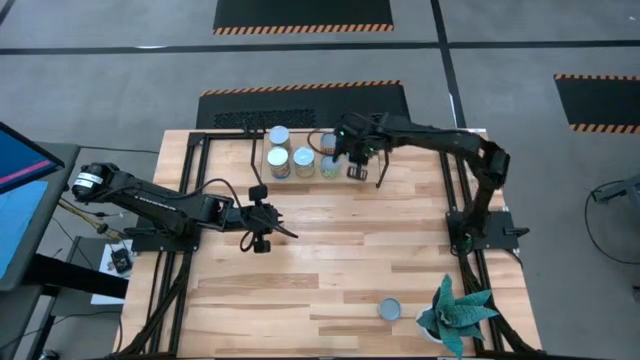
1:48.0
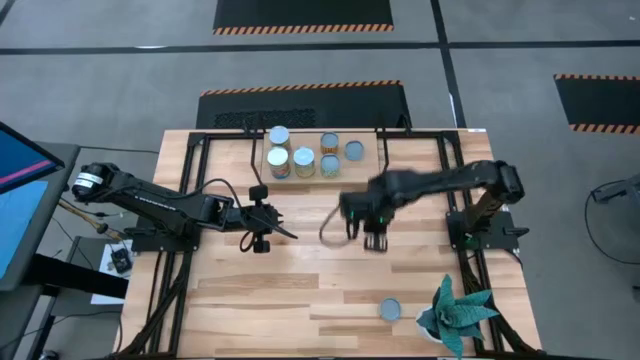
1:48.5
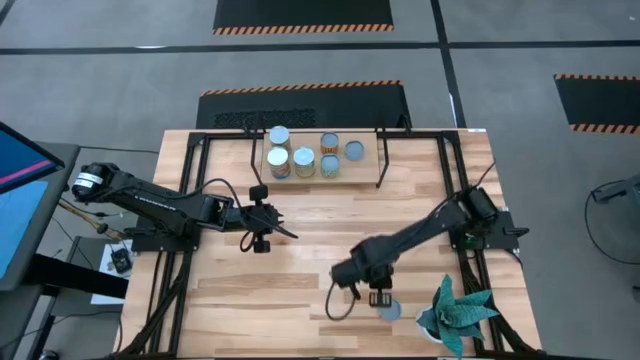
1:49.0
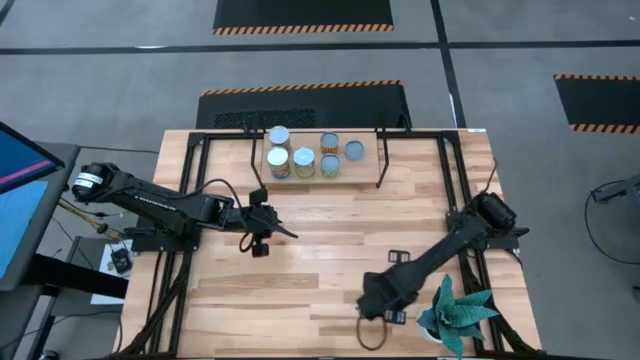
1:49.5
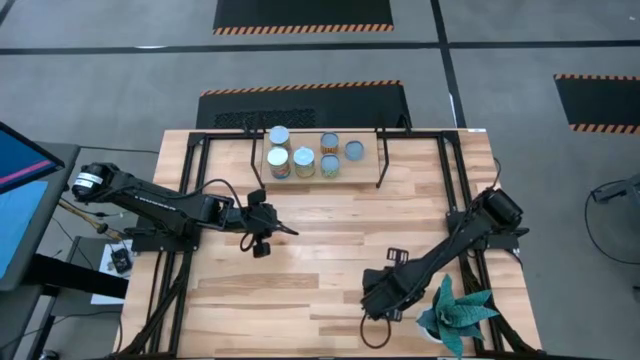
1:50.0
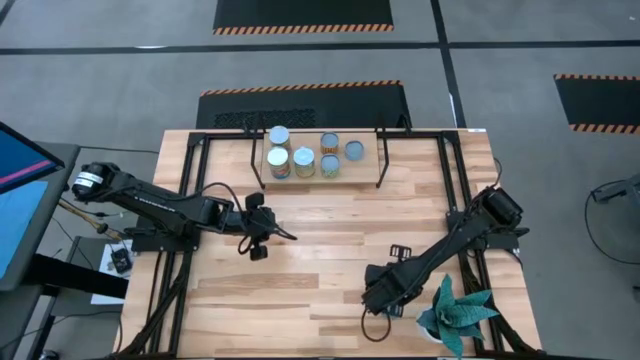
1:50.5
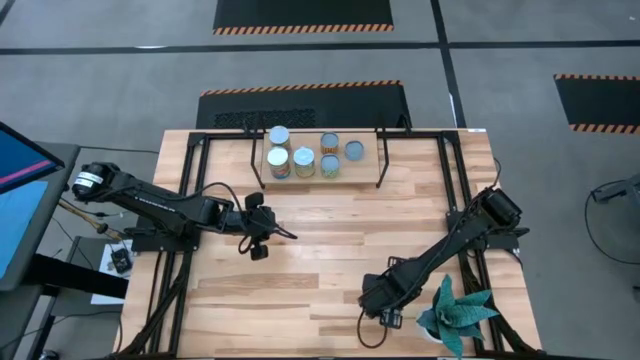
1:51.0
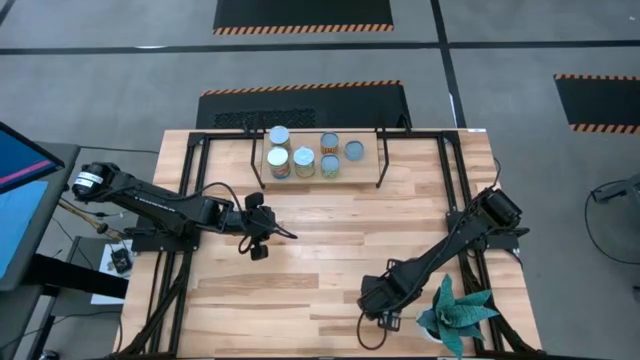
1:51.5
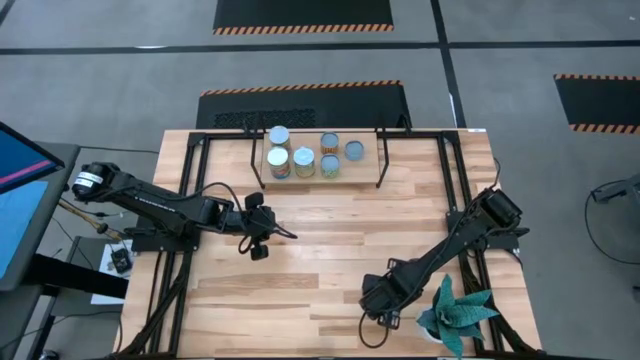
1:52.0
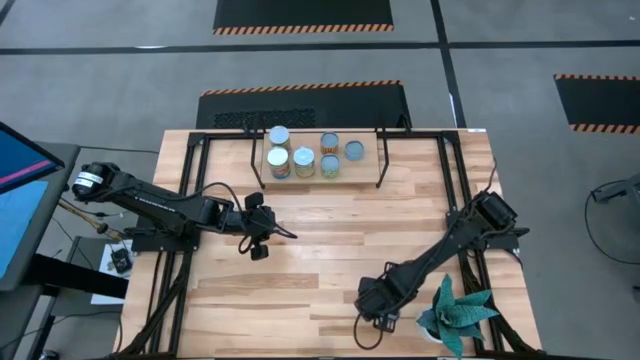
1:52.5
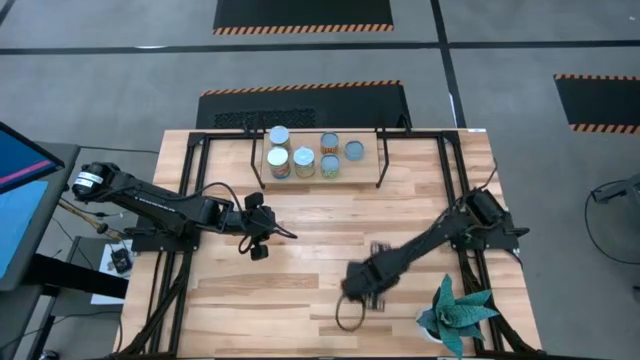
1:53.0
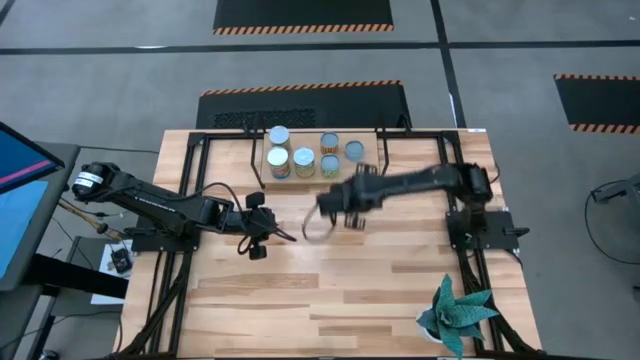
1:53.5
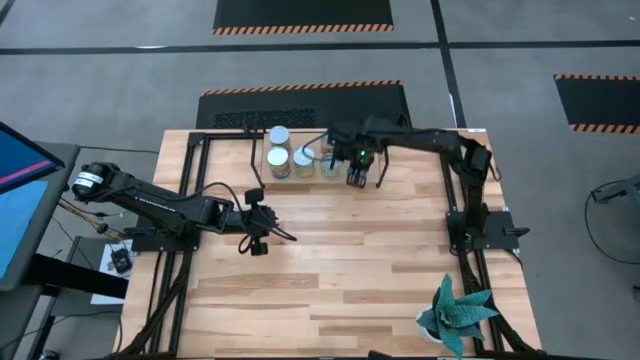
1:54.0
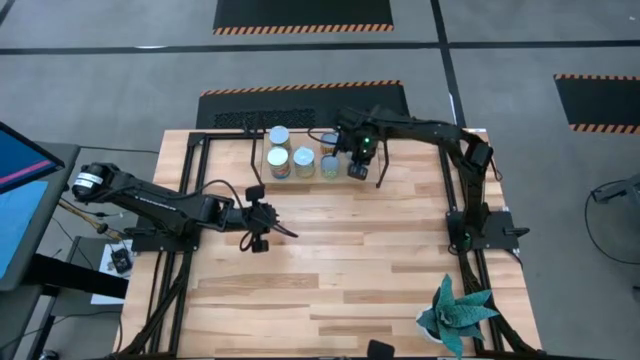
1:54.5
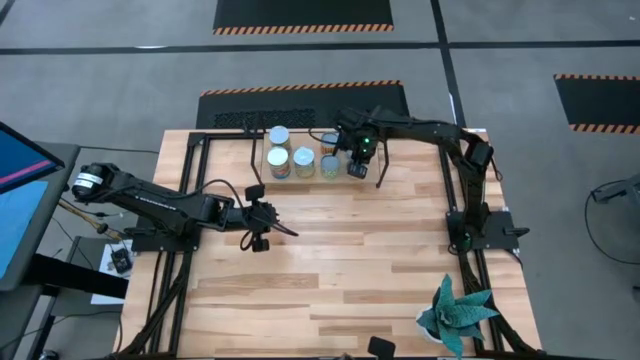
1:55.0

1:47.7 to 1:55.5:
Task: Pick and place cans onto a shelf
Put the canned mushrooms on the shelf

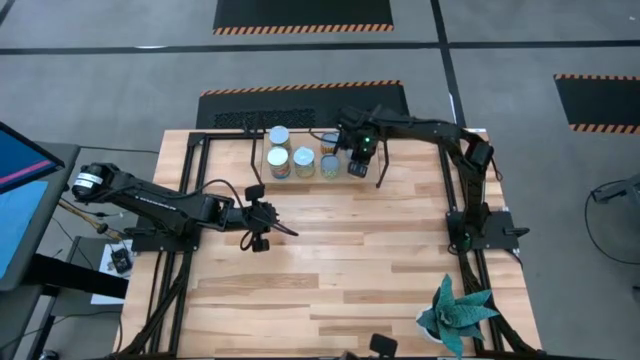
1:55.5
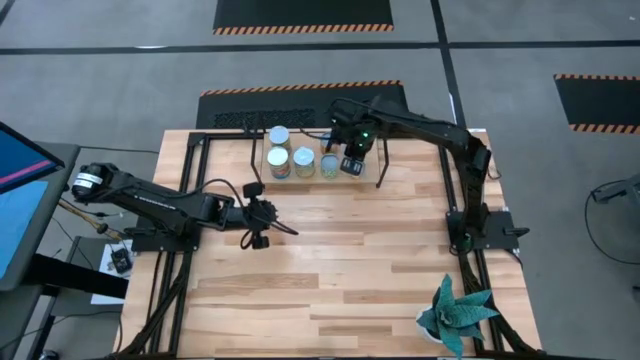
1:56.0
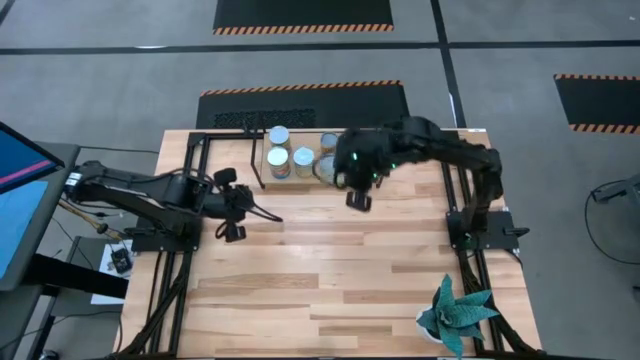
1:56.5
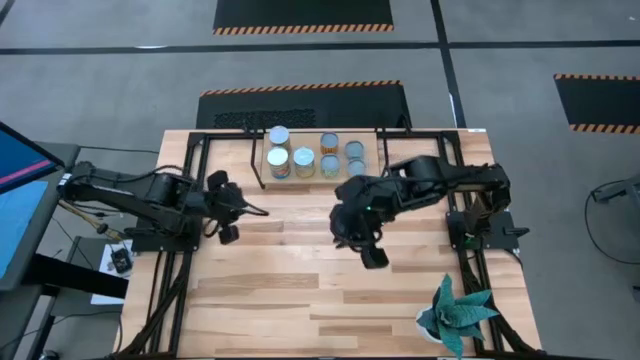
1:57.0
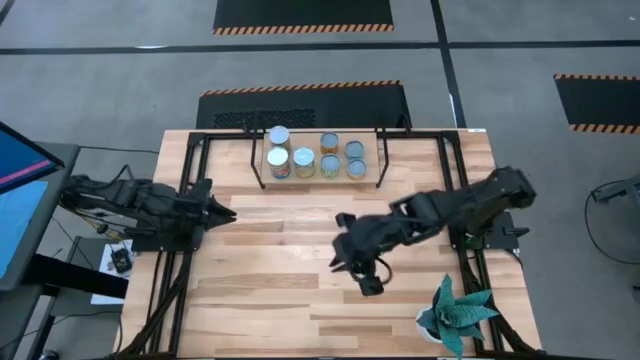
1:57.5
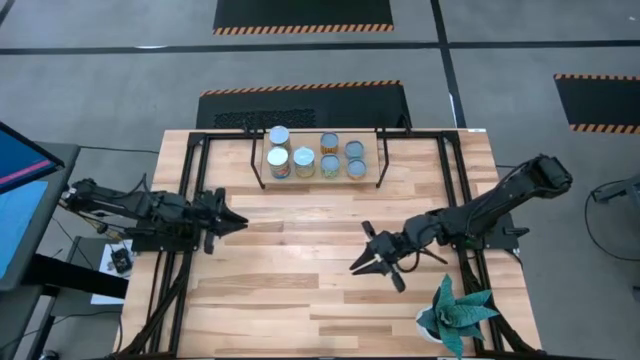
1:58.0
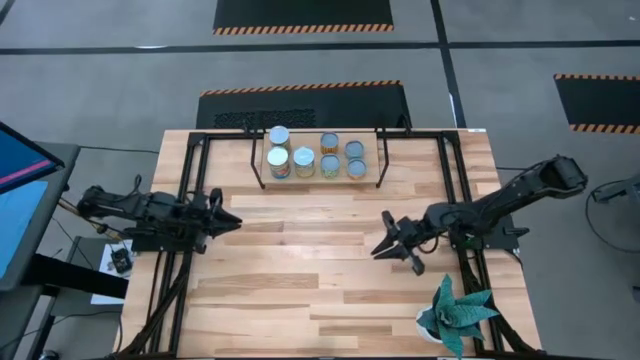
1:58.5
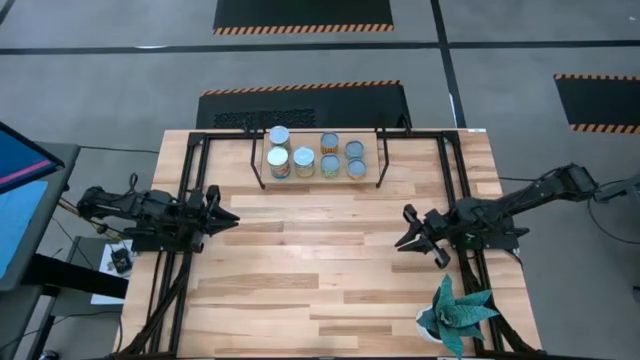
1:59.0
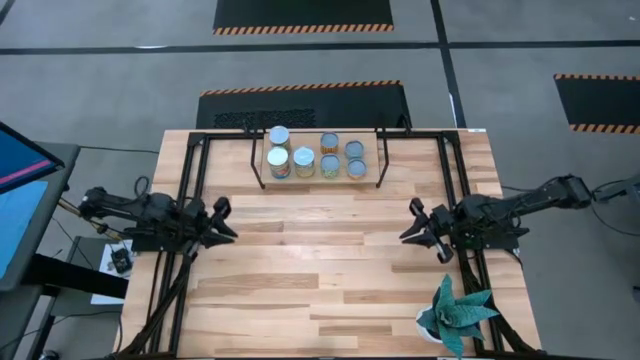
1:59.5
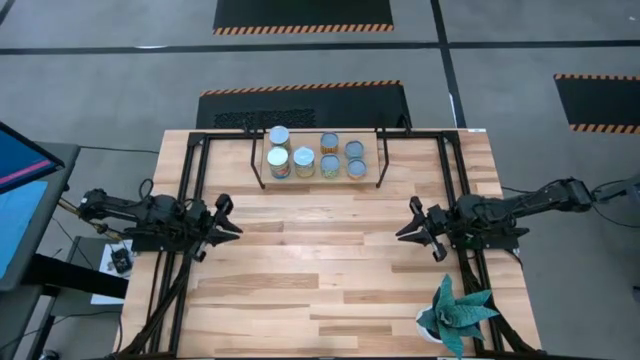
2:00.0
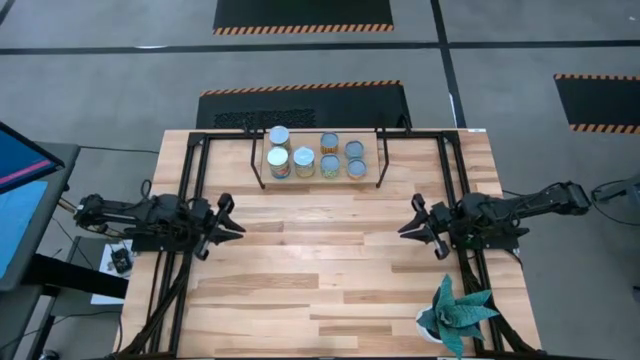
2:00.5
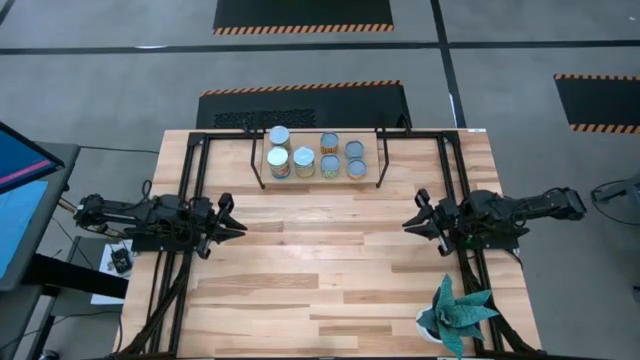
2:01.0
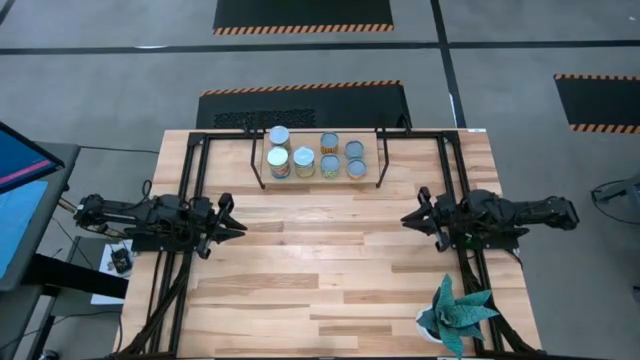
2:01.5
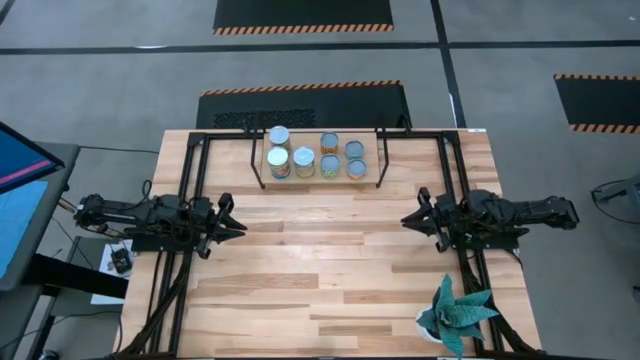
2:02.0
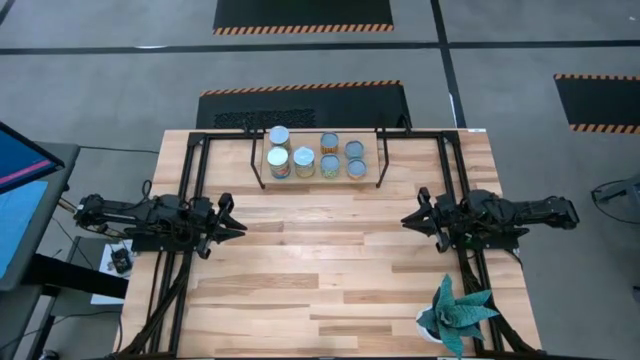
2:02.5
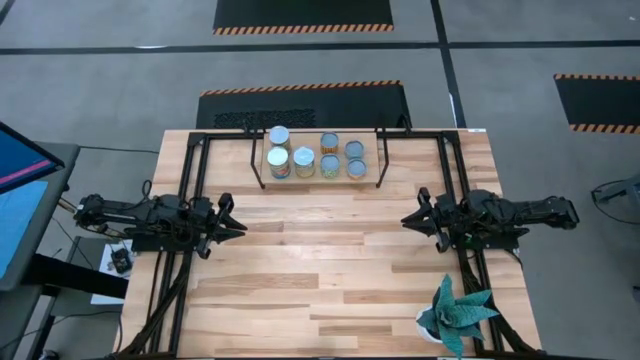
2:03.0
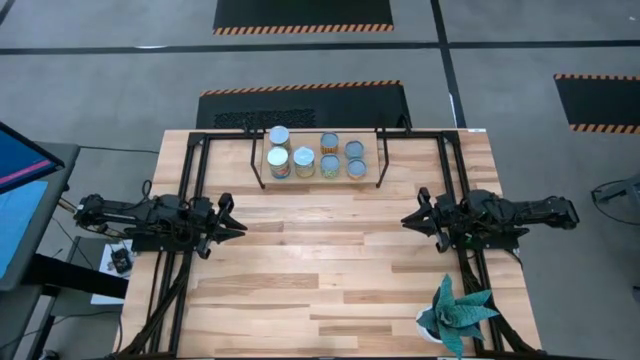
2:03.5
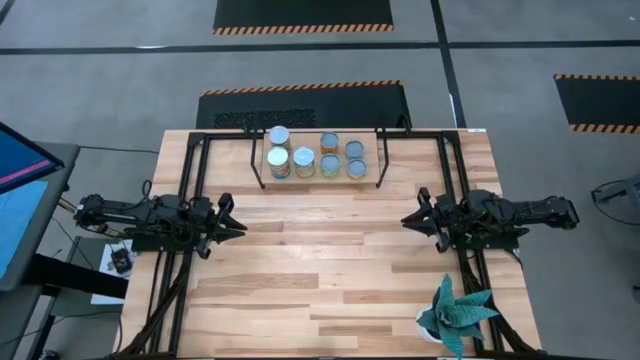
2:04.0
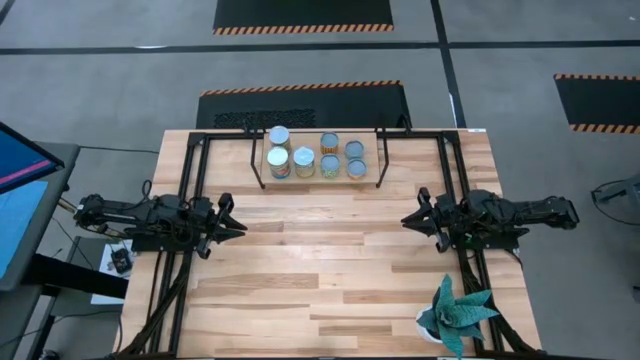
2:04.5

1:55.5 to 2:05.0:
Return to Home Position

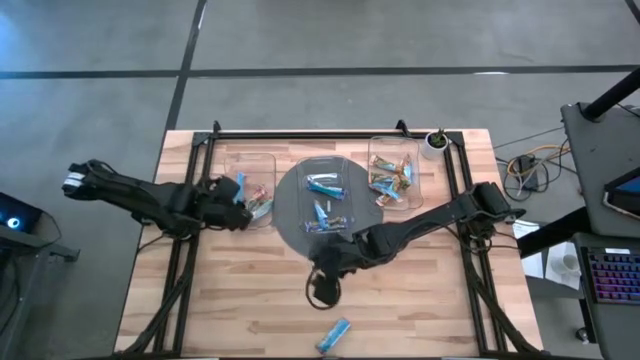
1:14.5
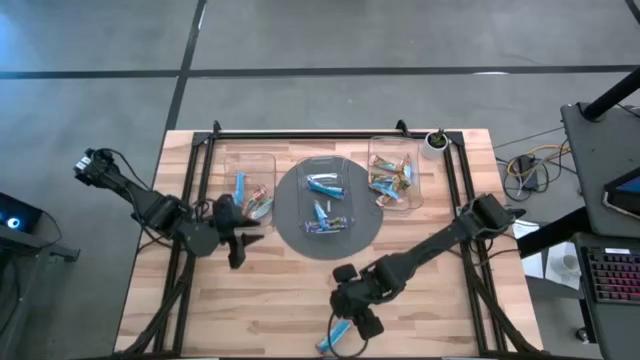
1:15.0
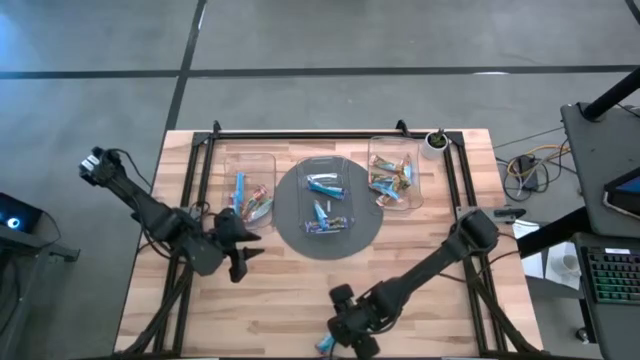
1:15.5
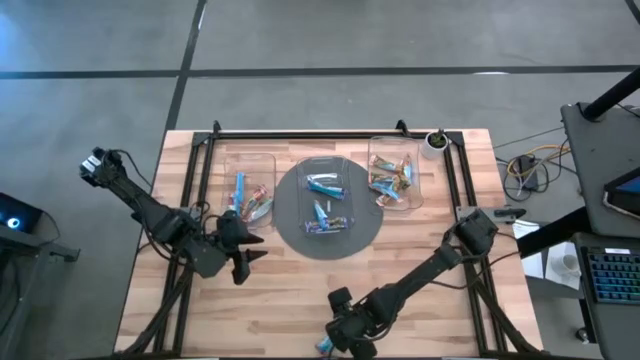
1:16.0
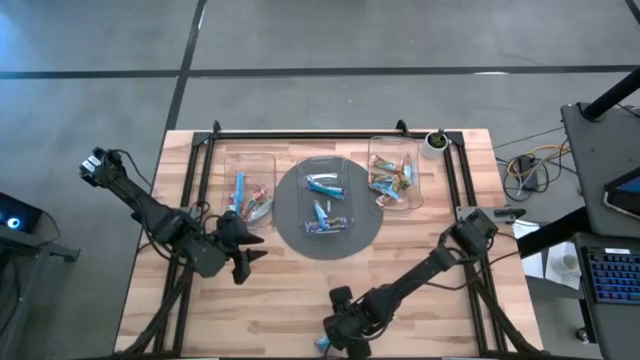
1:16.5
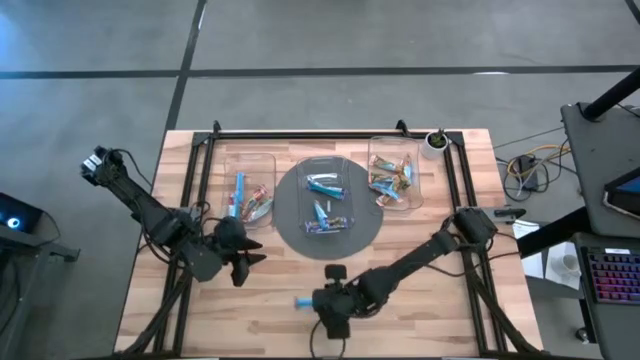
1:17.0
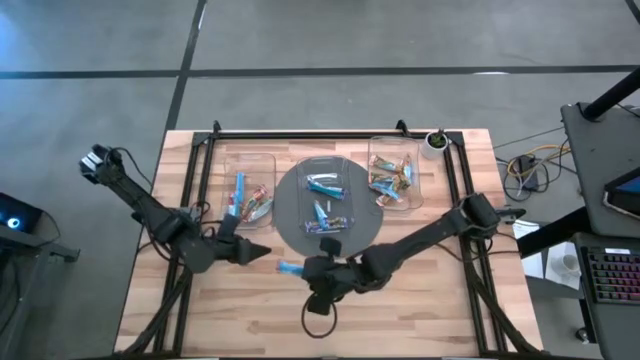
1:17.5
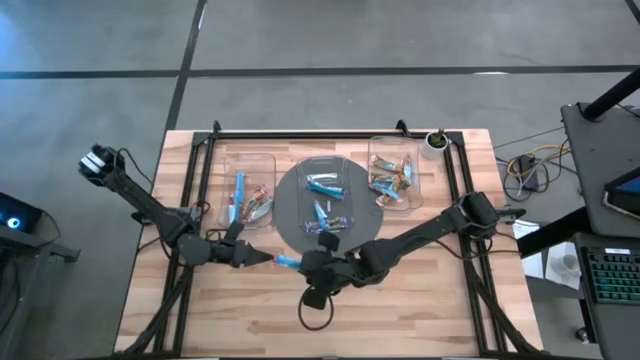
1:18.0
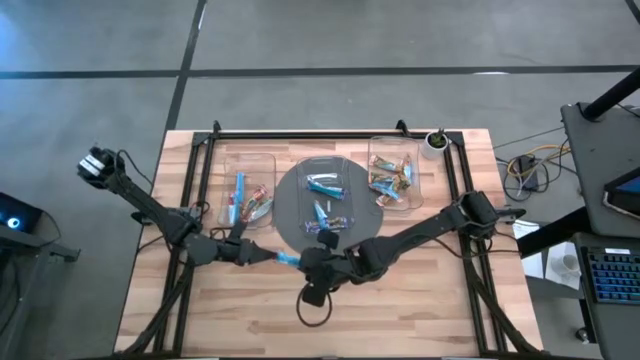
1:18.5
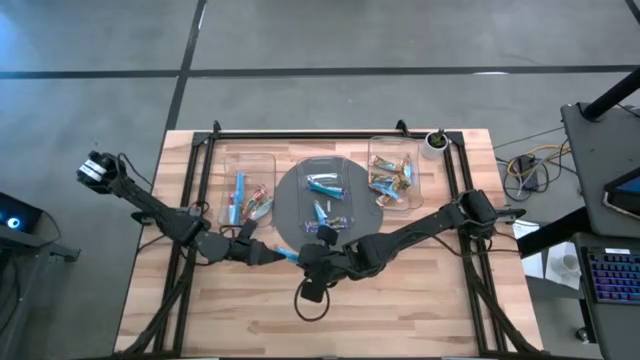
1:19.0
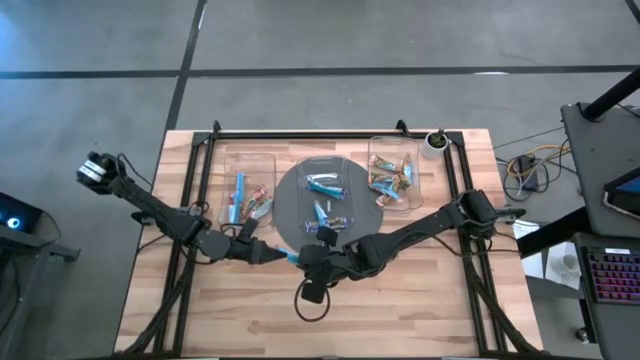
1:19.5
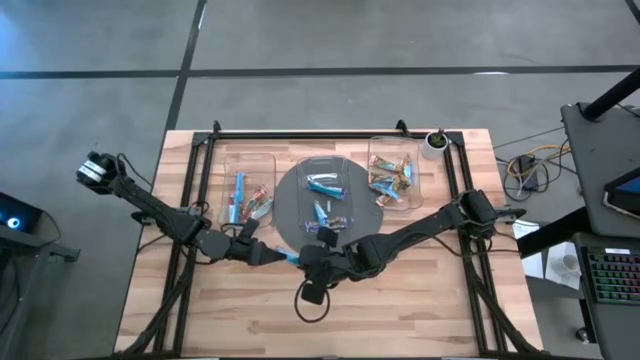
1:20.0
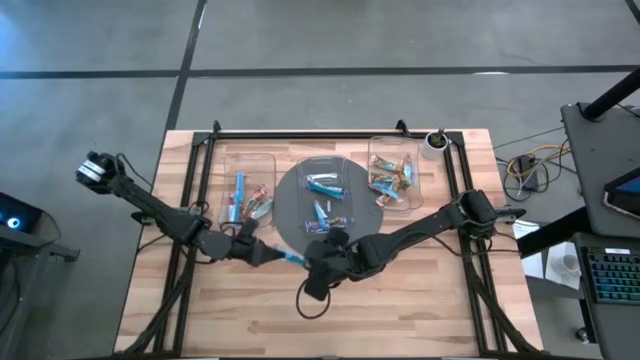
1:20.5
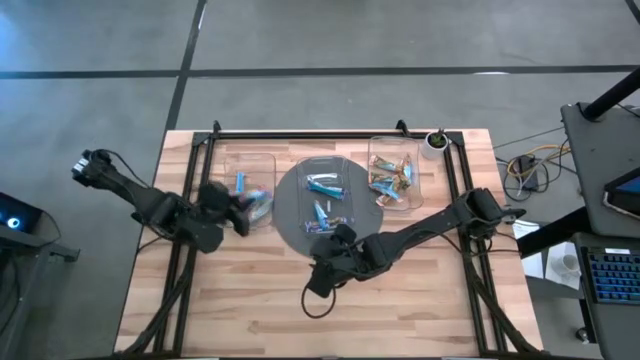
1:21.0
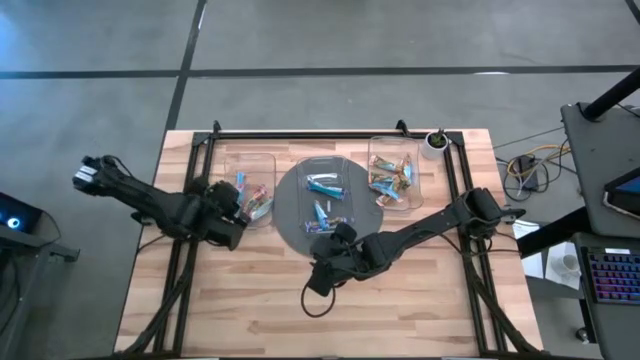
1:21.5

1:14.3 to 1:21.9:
Task: Pick and place Granola Bars by type
Put the red granola bar into the left transparent bin
